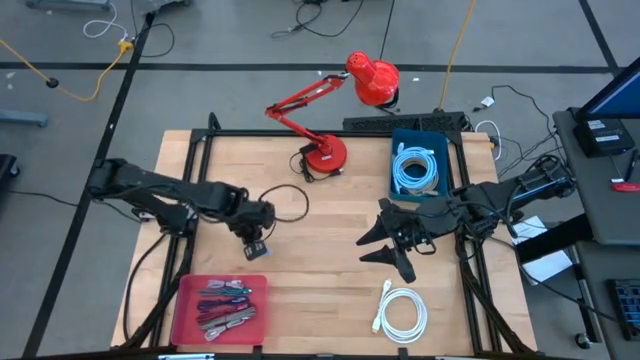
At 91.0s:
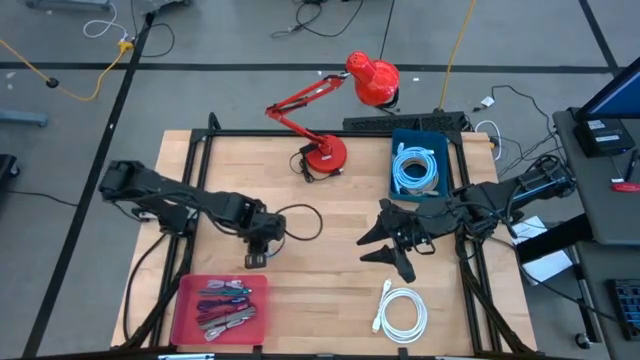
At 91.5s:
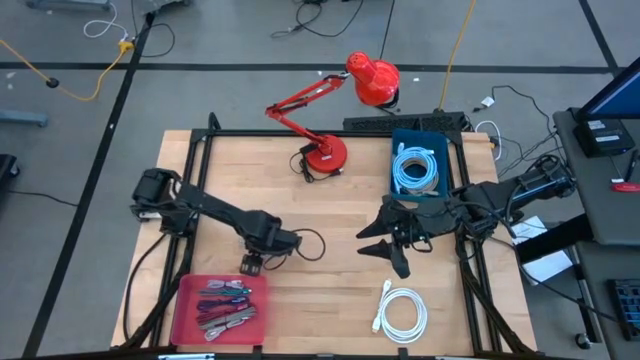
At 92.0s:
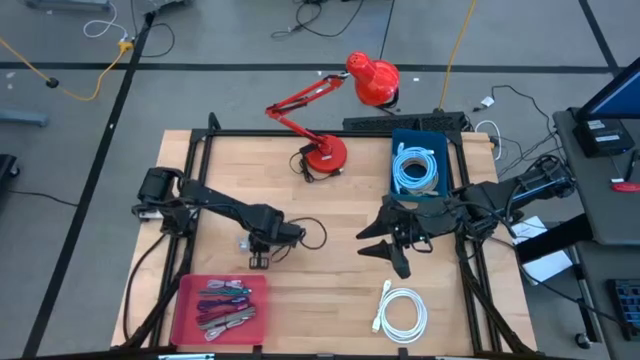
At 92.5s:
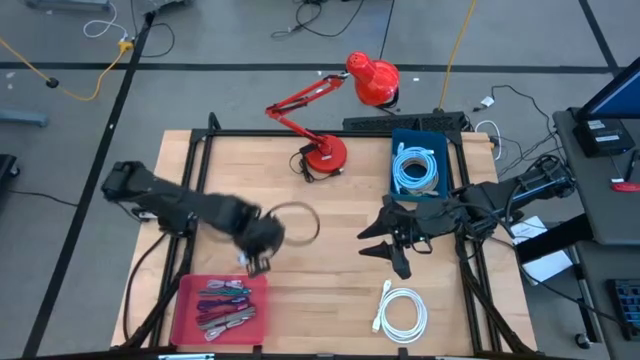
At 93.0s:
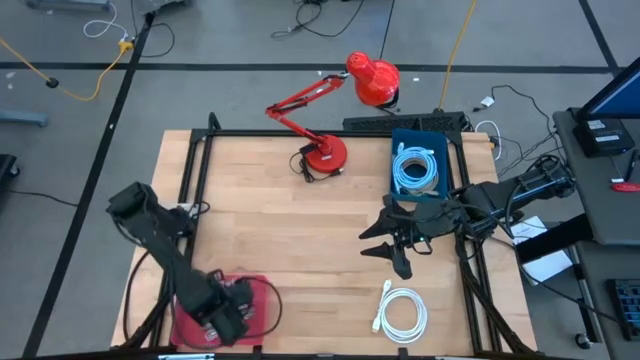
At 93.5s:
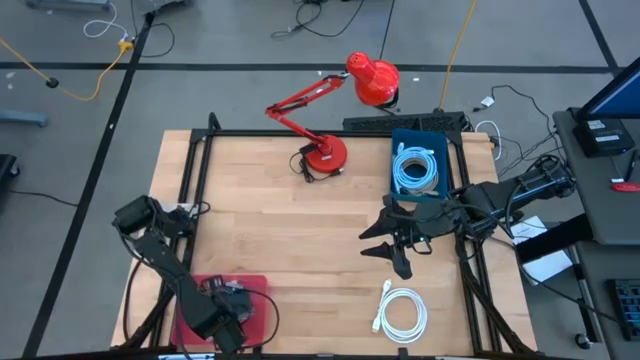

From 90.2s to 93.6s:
Task: Sort cables
Put the gray charger cable into the pink bin

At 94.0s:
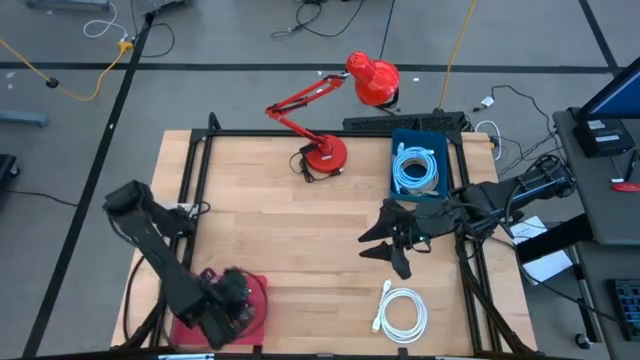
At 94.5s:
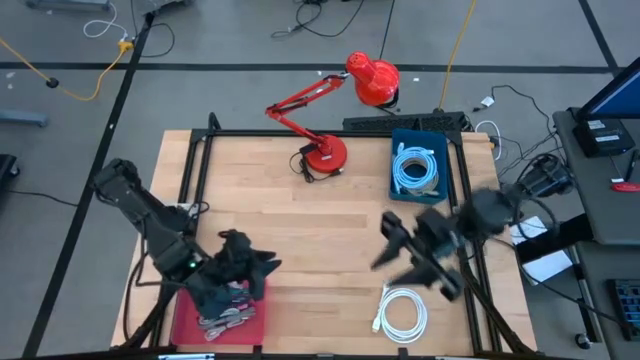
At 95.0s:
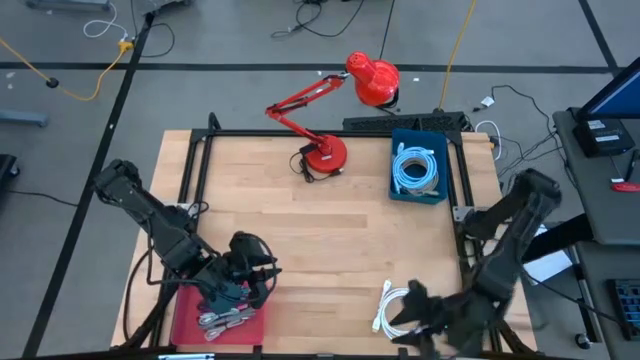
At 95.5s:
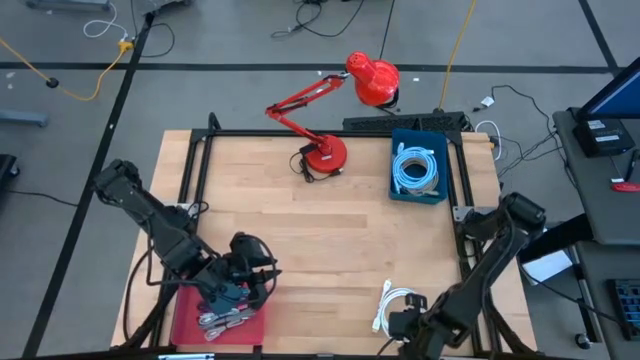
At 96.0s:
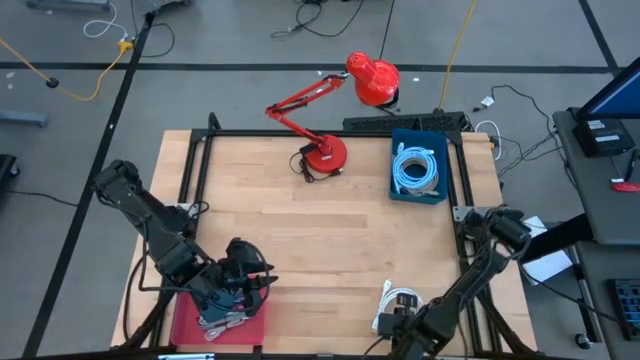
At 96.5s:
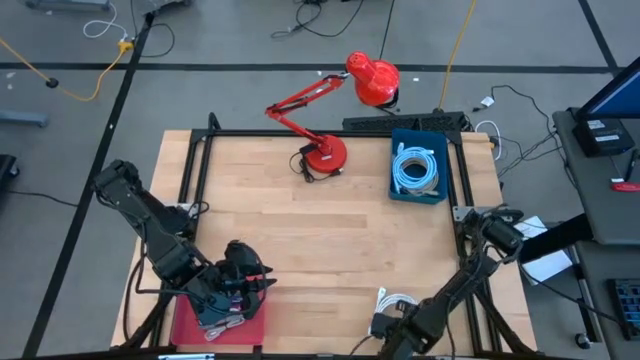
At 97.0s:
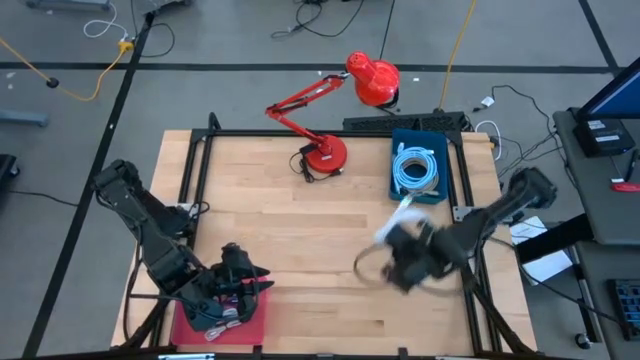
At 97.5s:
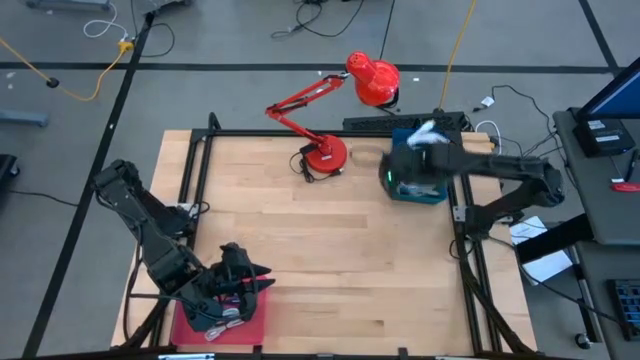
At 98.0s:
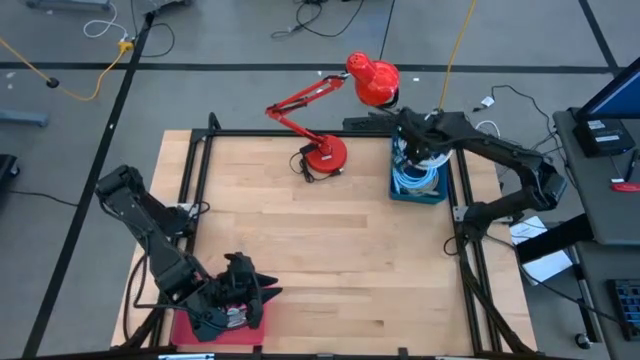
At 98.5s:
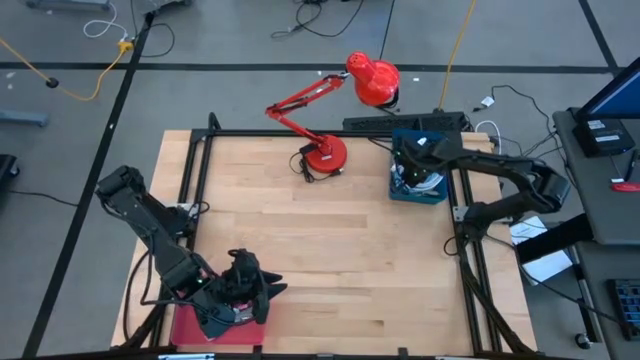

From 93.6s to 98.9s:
Put the white usb cable into the blue bin

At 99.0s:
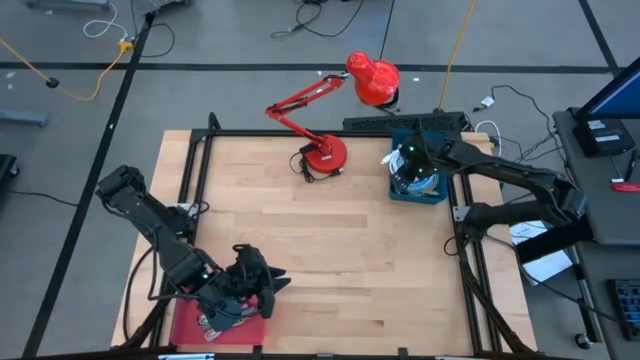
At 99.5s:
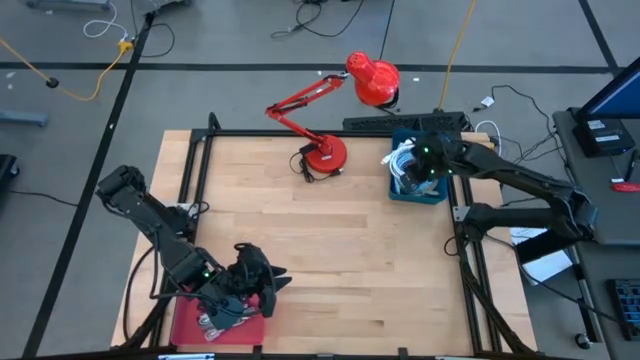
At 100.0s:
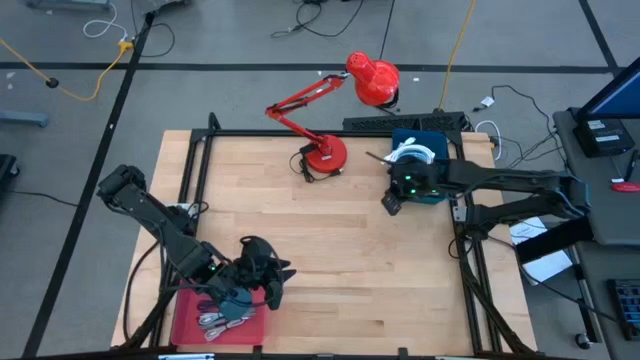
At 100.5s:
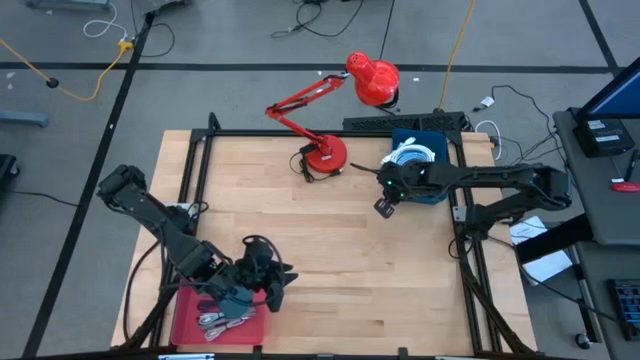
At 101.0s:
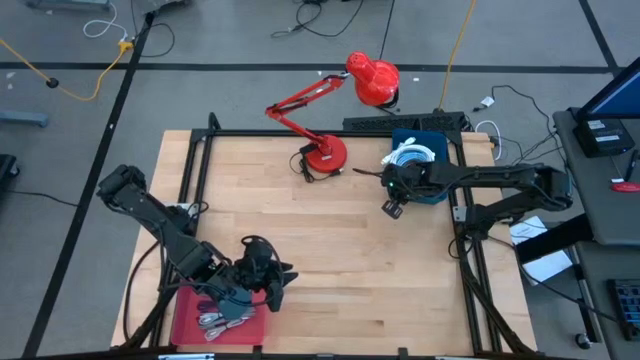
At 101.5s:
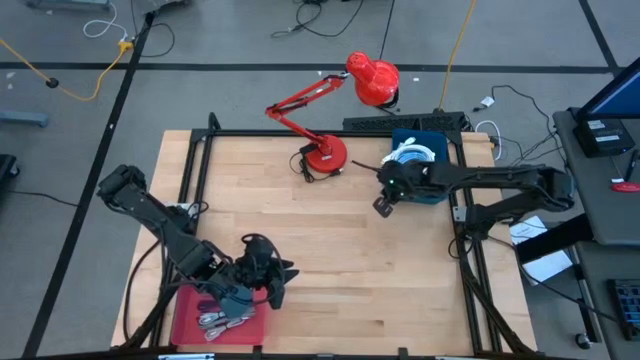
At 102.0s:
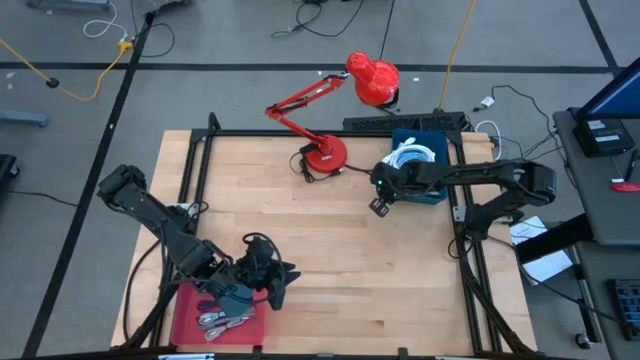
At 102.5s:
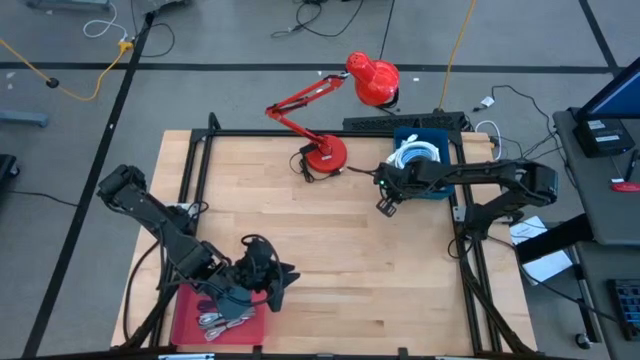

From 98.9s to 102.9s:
Adjust the blue bin

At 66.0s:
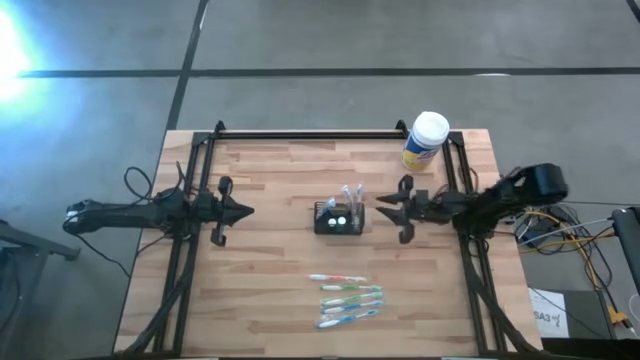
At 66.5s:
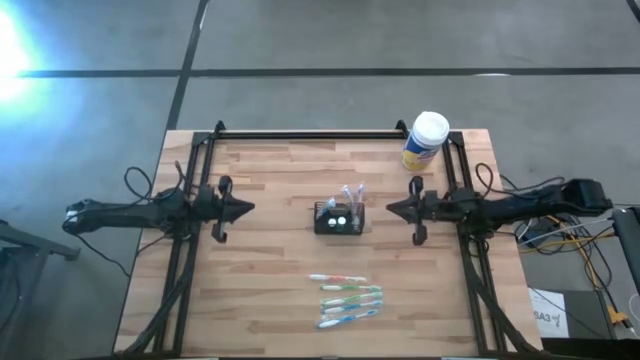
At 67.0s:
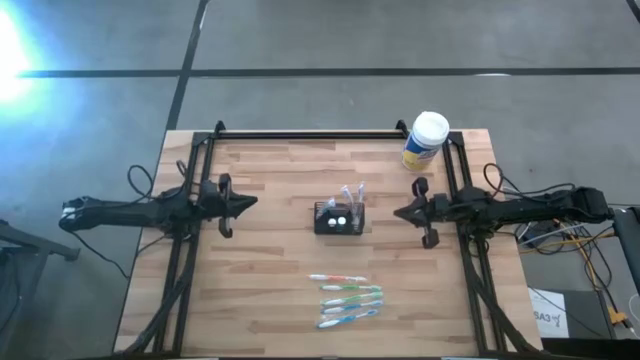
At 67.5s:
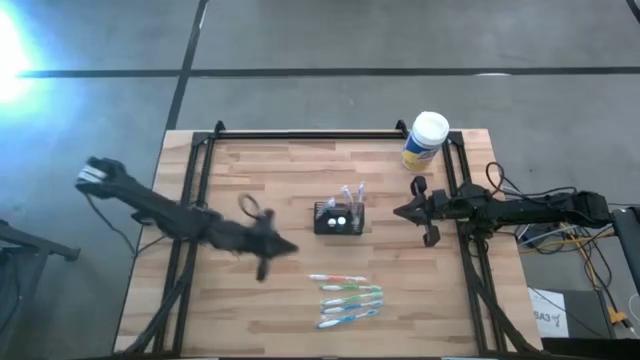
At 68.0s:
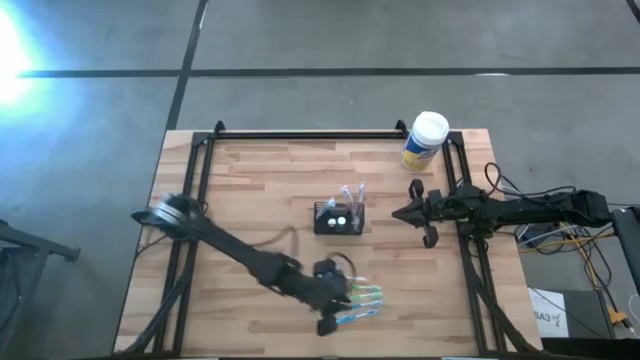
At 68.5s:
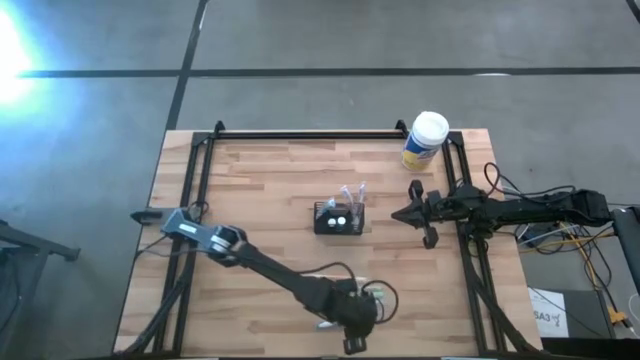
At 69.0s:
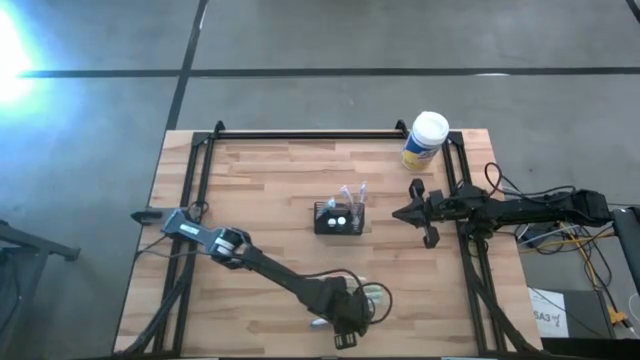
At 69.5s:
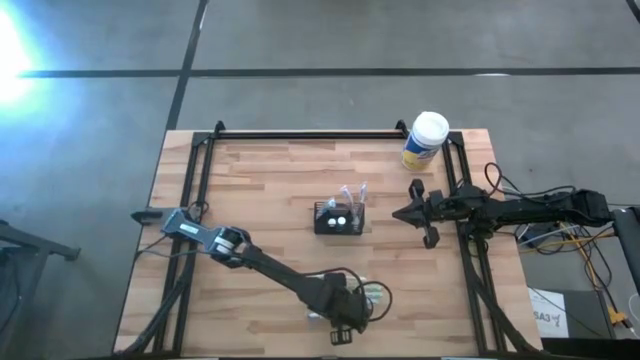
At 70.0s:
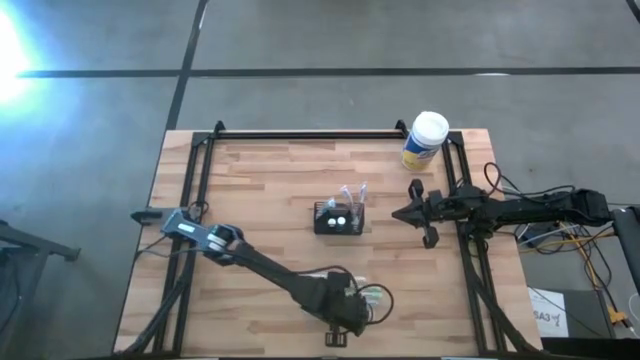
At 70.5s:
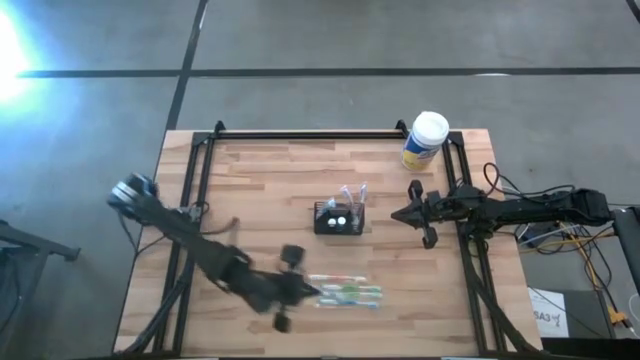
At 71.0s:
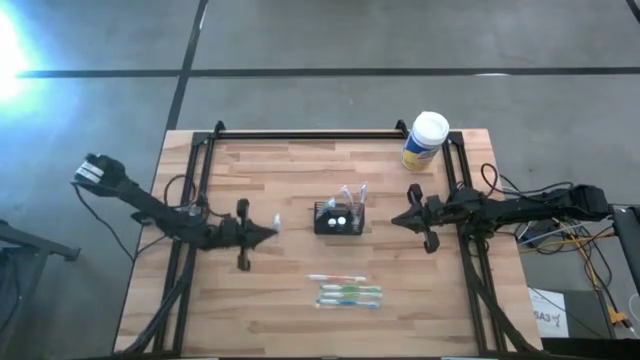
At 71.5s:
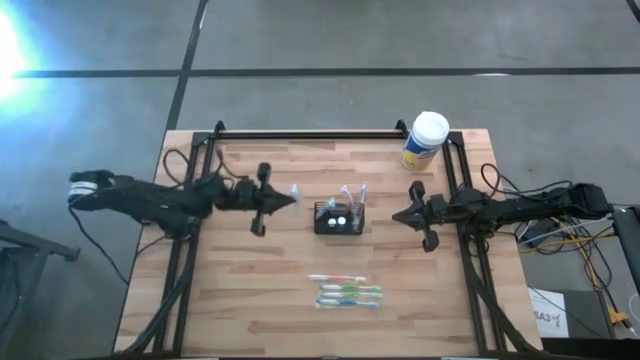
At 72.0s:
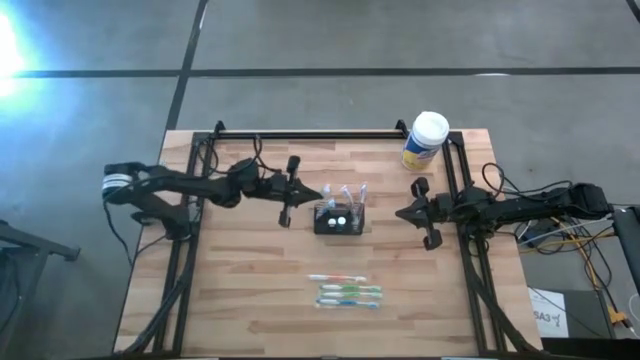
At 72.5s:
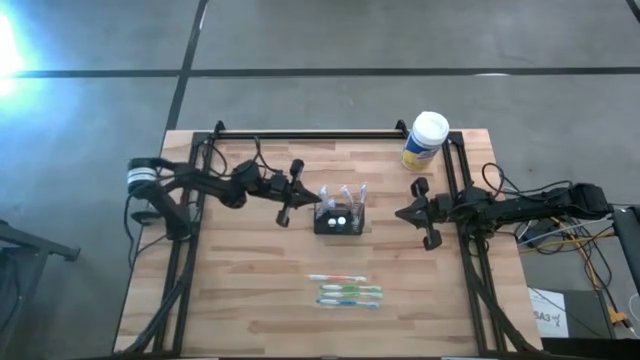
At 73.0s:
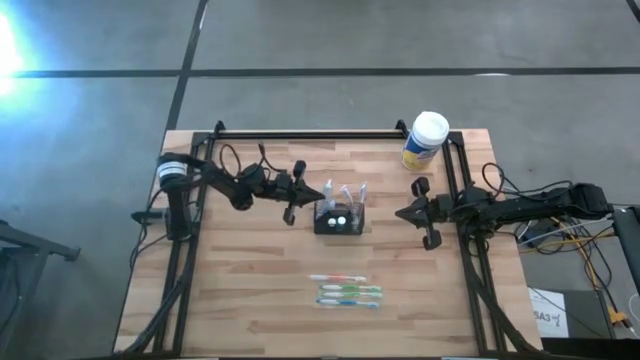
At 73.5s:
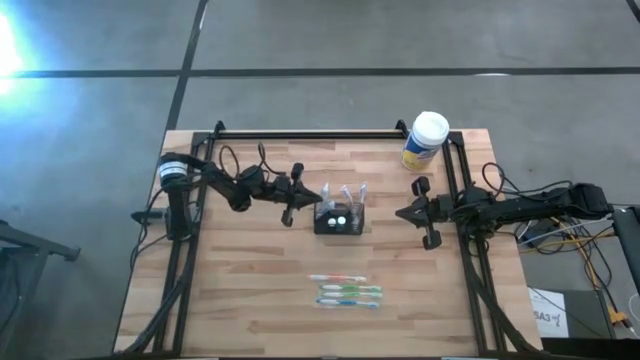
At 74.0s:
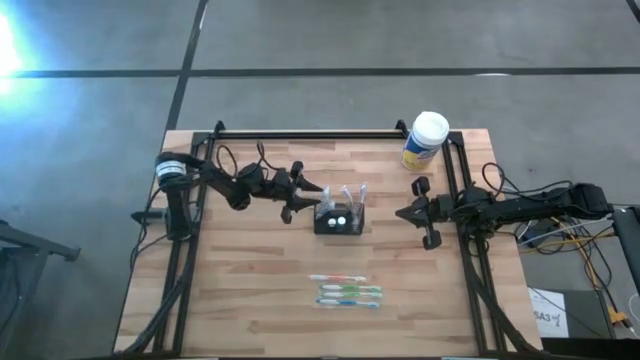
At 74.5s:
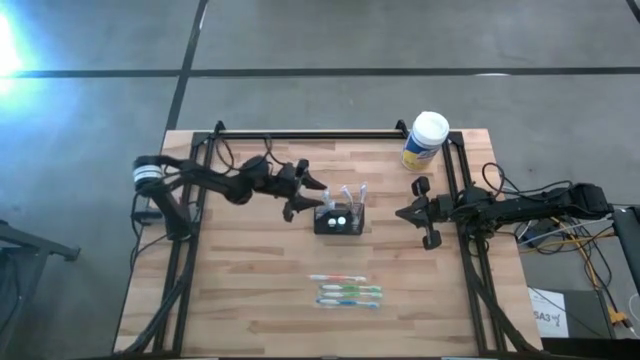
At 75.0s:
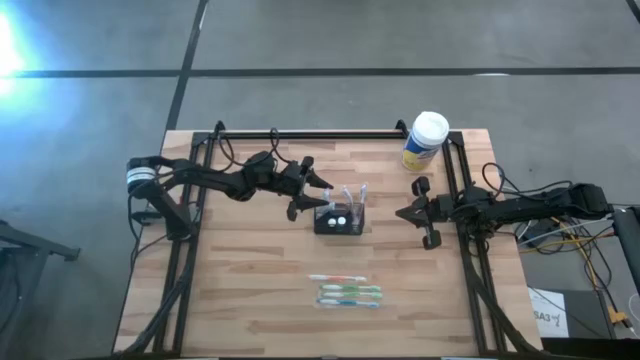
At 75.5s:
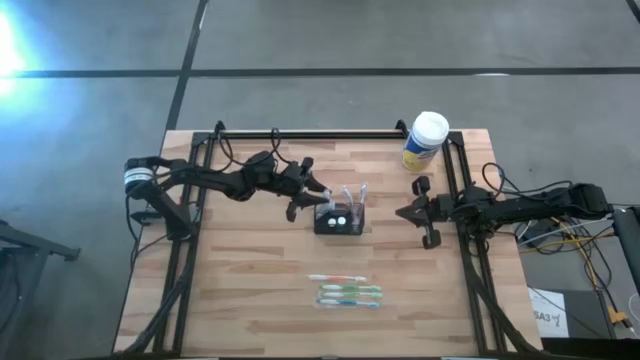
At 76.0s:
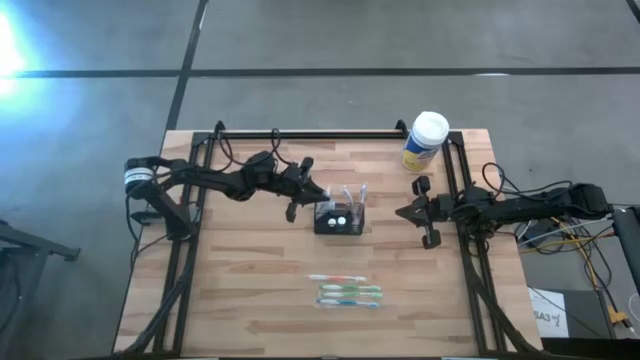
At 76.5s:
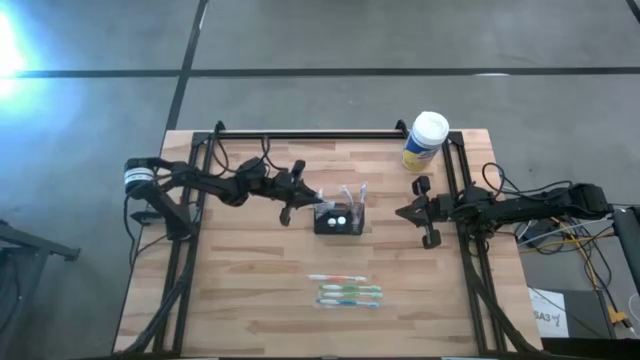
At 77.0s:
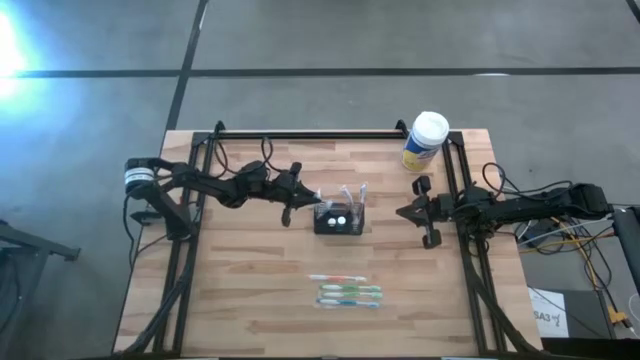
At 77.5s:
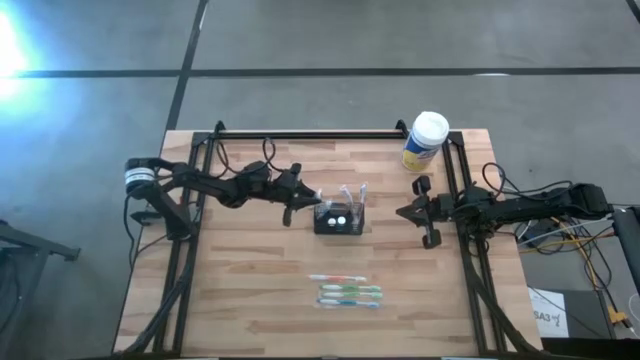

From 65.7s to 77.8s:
Task: Pick & Place toothbrushing station
Put the bottom blue toothbrush into the wire organizer
